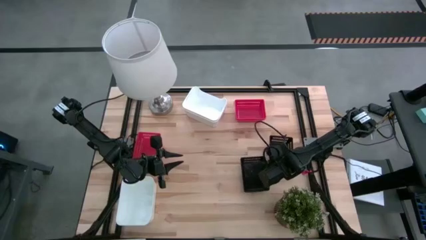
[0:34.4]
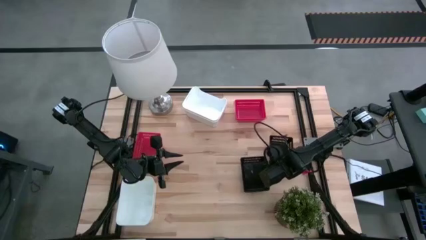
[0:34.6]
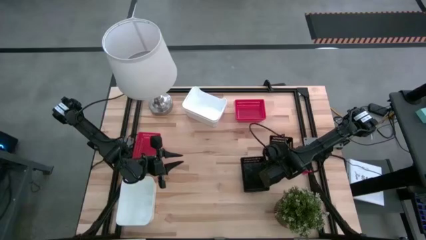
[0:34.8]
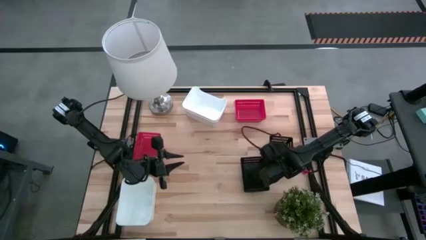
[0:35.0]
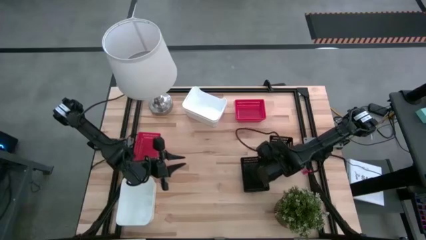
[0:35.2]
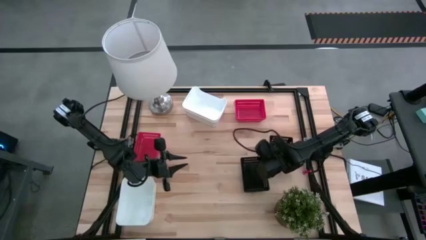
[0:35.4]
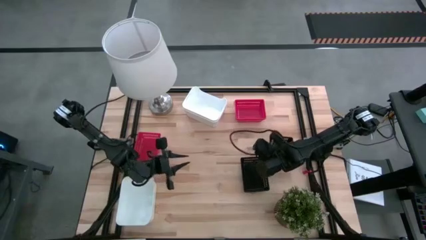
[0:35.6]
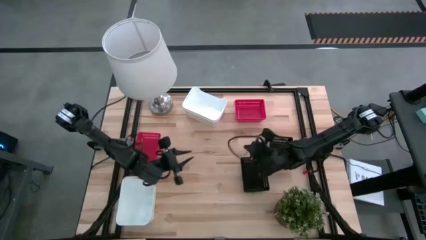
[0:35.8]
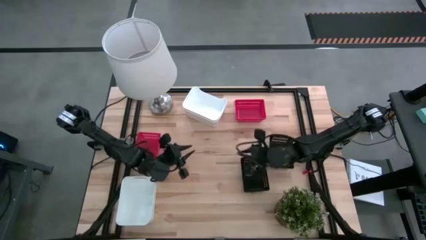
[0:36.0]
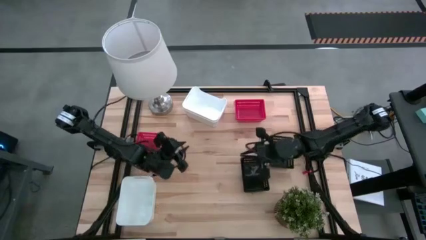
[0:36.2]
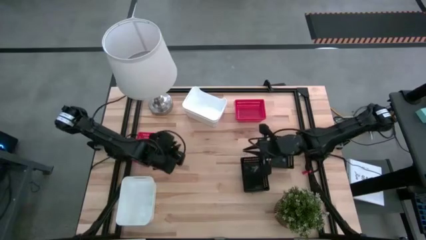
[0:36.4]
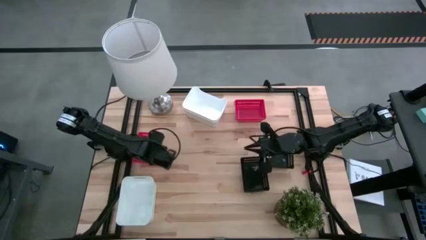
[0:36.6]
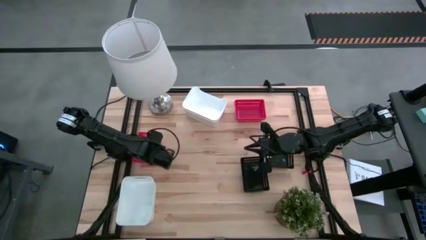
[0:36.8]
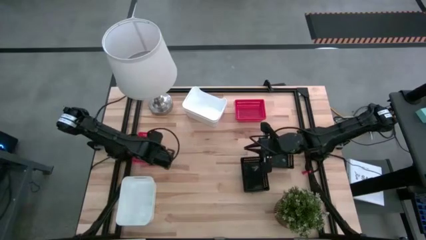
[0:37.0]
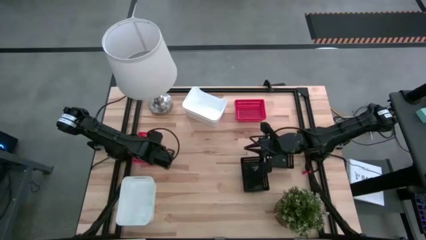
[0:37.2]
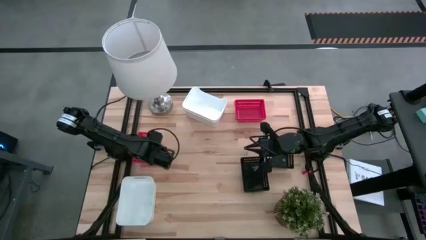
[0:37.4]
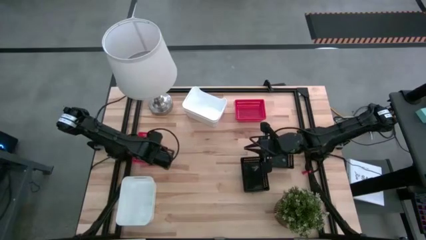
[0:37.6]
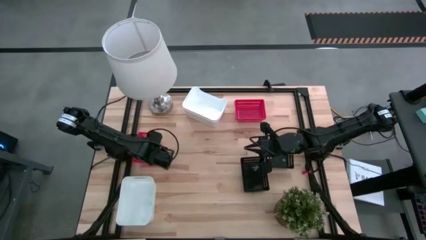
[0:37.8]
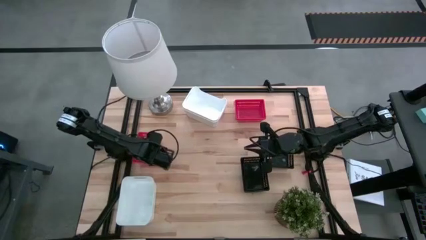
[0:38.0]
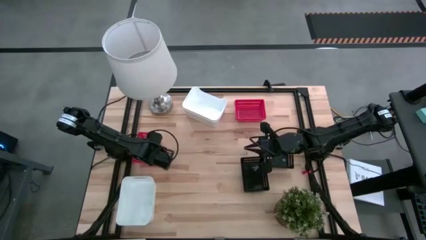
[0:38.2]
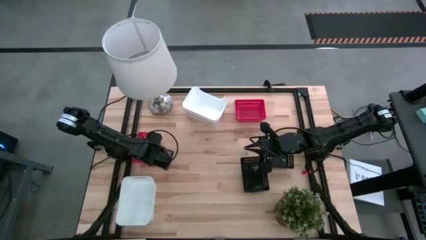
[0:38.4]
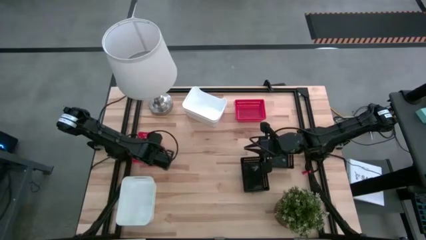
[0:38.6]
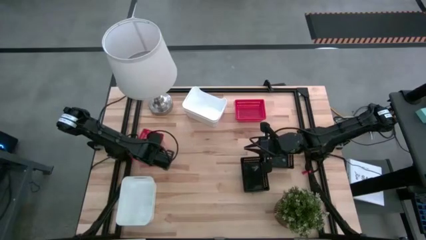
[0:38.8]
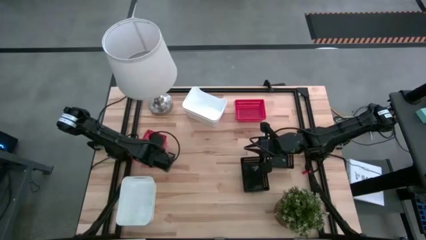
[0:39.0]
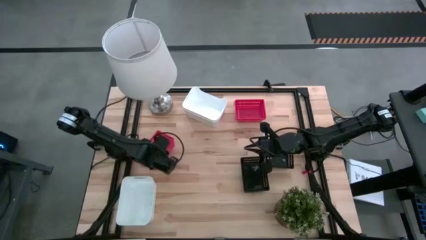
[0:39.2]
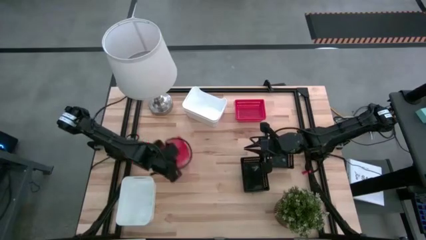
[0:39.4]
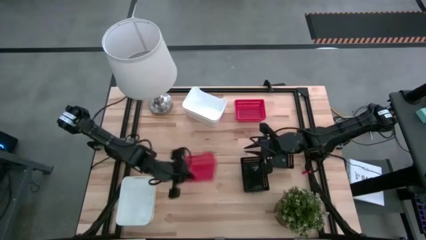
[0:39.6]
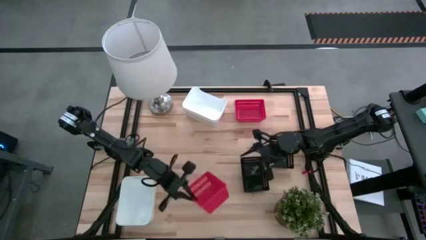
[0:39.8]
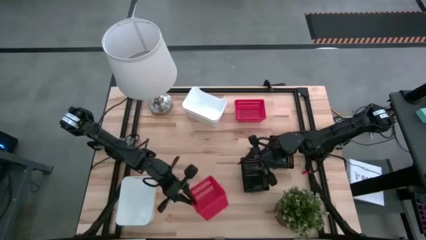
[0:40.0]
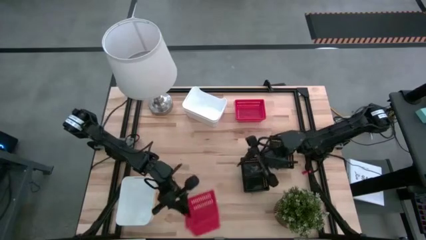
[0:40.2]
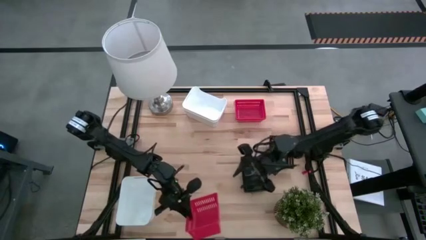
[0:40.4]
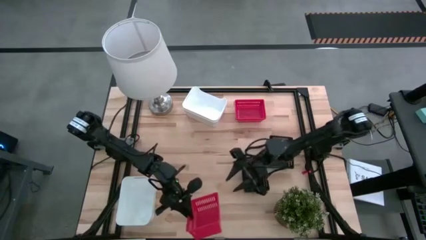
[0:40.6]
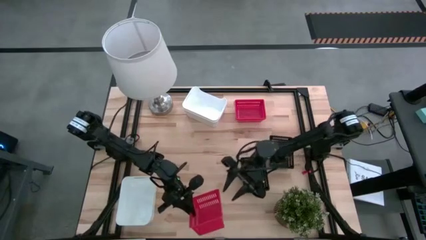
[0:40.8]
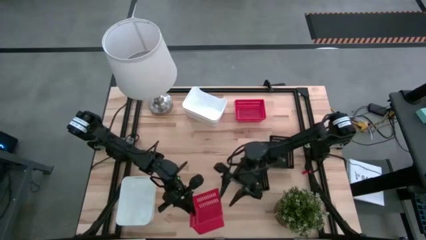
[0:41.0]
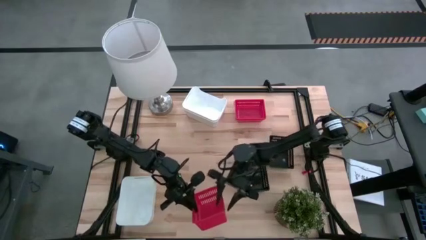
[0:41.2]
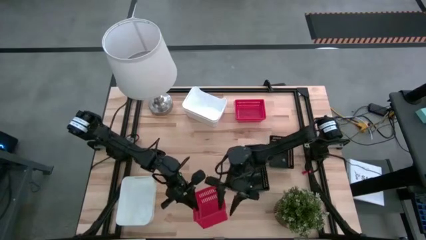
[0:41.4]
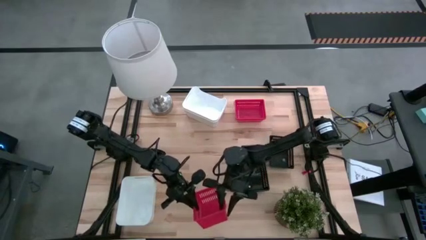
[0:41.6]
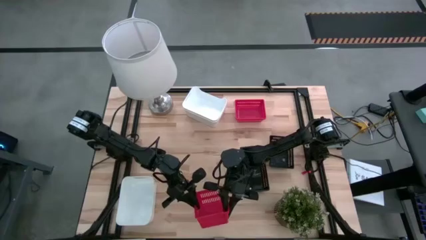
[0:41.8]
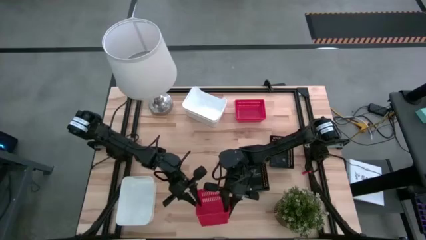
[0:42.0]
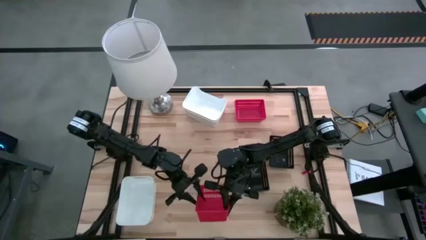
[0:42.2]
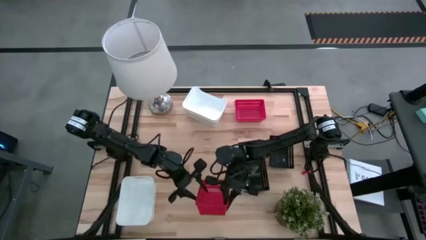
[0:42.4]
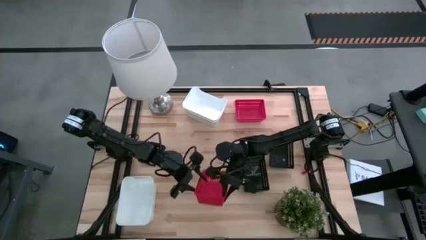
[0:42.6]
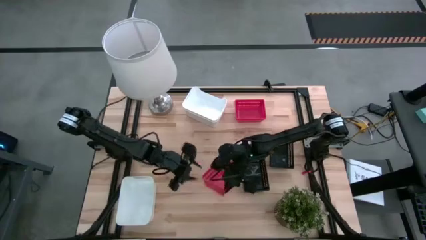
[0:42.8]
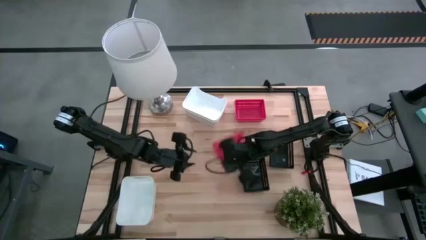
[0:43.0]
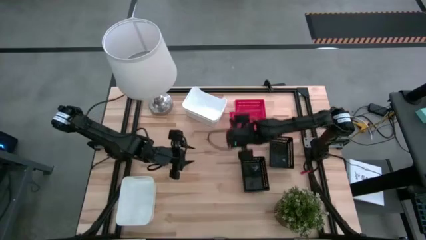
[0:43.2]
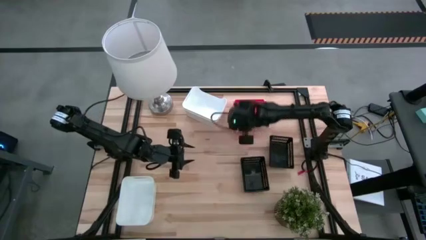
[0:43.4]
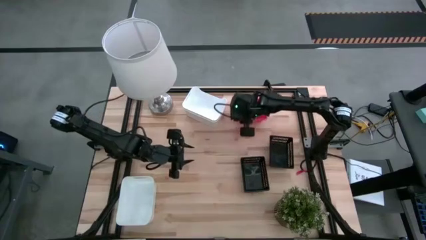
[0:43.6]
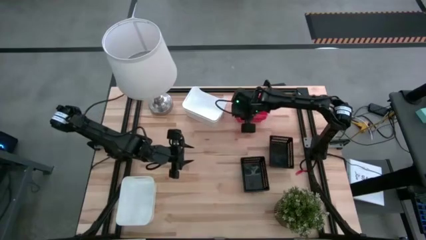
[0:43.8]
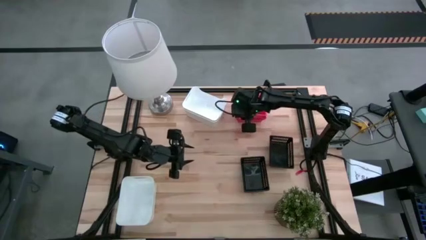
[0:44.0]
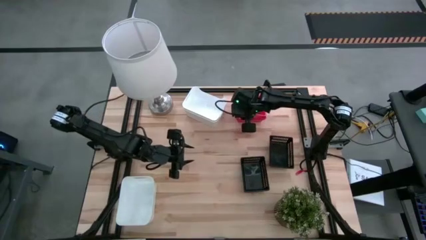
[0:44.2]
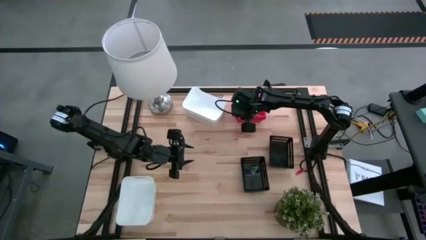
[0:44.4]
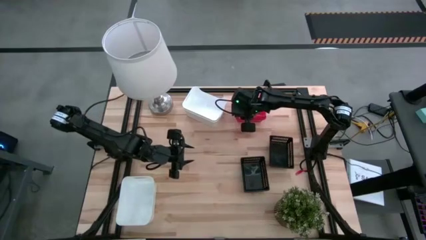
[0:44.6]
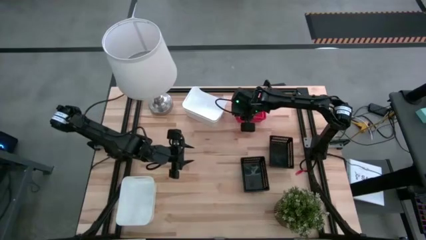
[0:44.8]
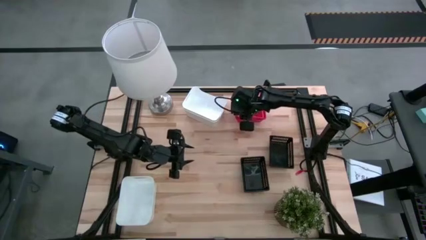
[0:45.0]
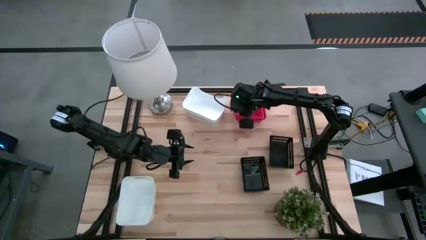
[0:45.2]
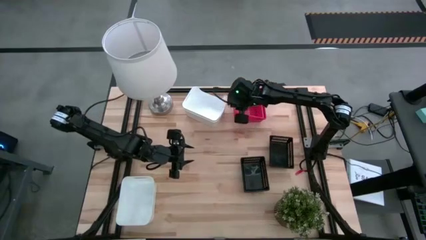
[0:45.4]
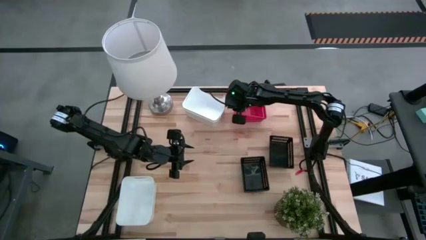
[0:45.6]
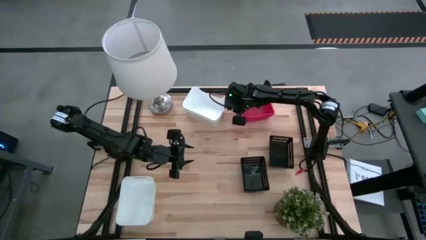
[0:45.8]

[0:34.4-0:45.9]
Stack the bottom red bin on top of the top red bin
